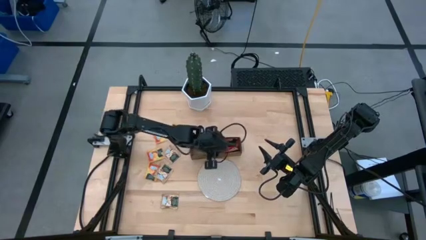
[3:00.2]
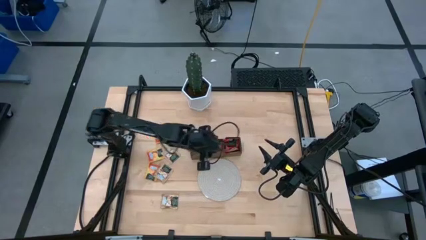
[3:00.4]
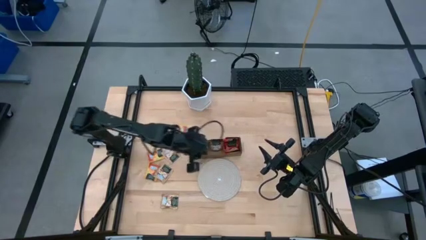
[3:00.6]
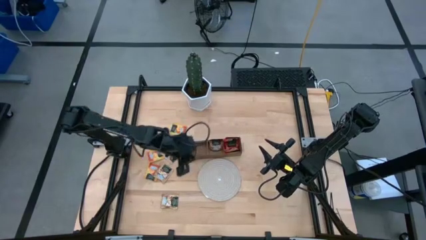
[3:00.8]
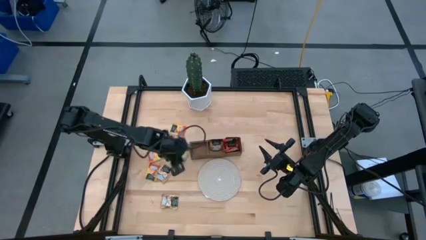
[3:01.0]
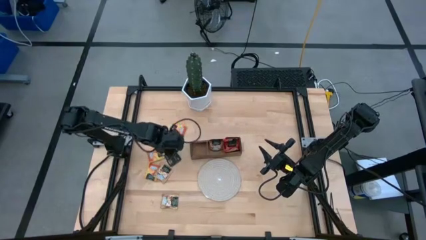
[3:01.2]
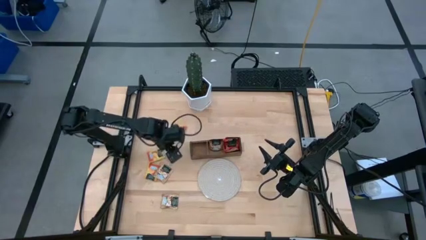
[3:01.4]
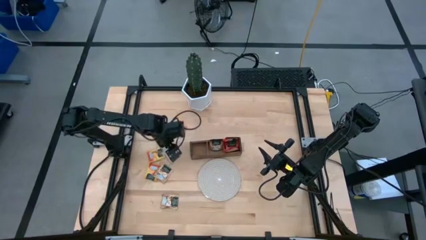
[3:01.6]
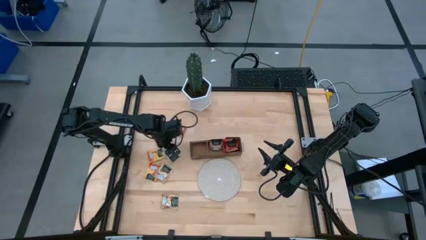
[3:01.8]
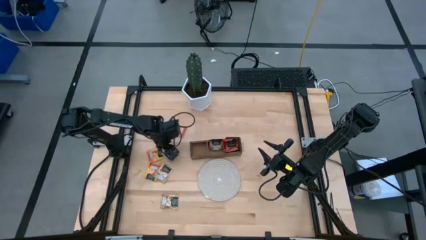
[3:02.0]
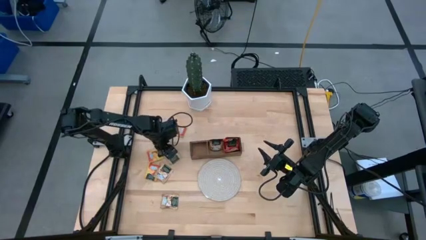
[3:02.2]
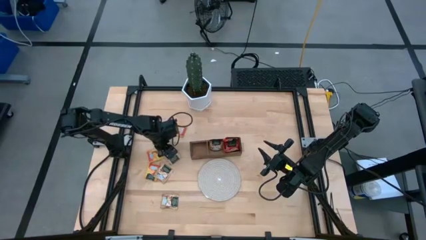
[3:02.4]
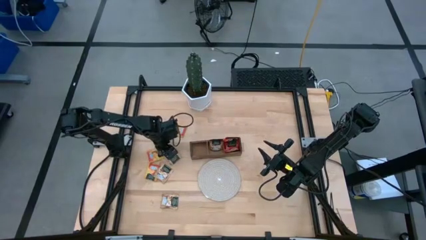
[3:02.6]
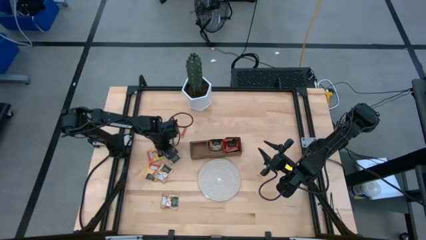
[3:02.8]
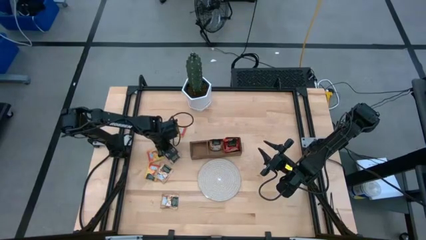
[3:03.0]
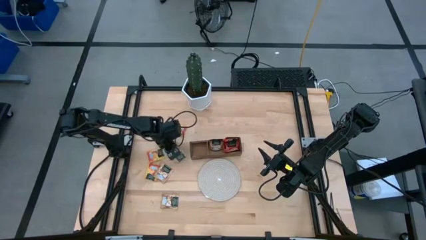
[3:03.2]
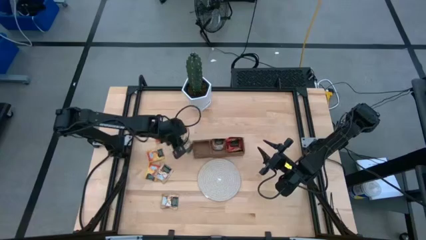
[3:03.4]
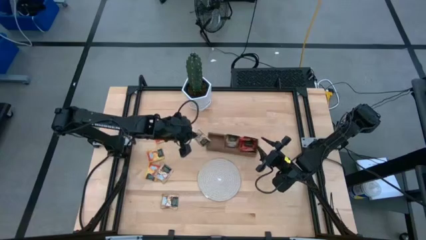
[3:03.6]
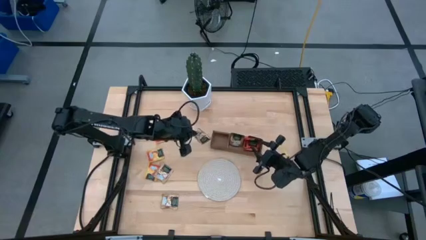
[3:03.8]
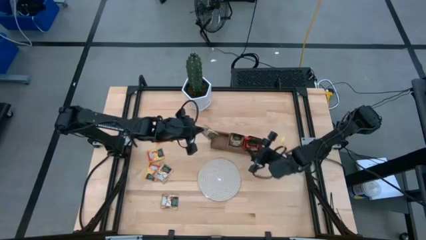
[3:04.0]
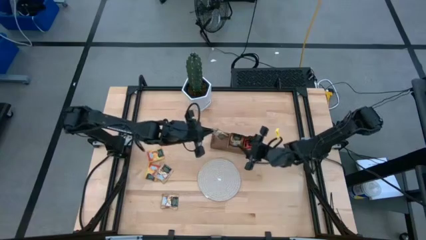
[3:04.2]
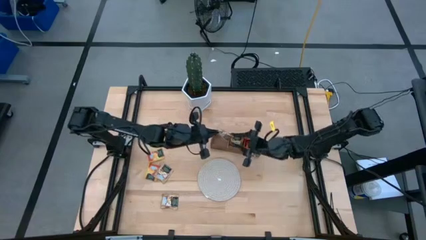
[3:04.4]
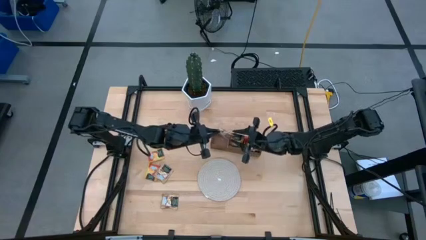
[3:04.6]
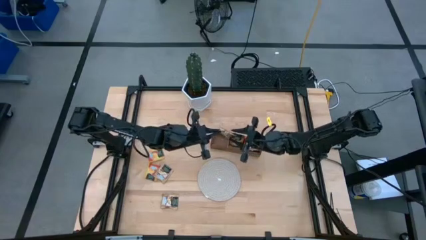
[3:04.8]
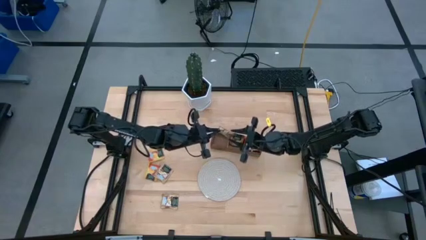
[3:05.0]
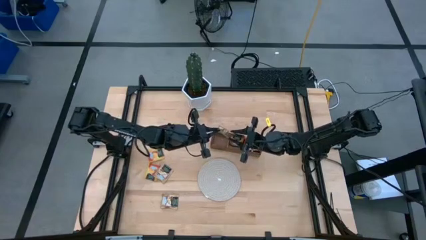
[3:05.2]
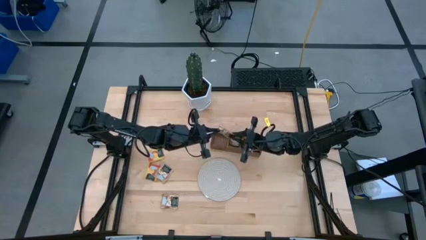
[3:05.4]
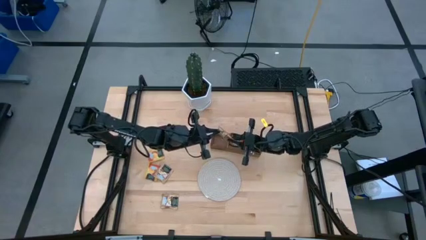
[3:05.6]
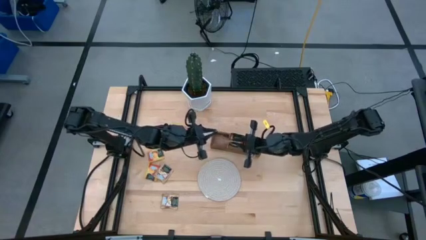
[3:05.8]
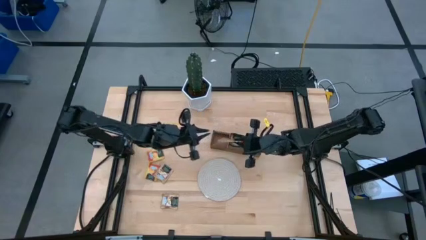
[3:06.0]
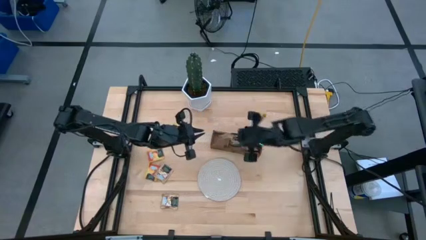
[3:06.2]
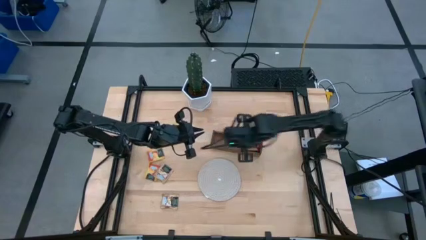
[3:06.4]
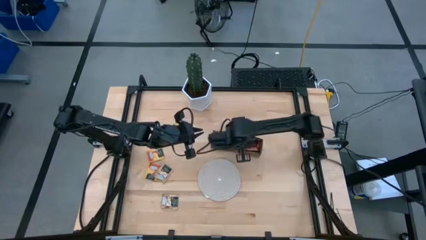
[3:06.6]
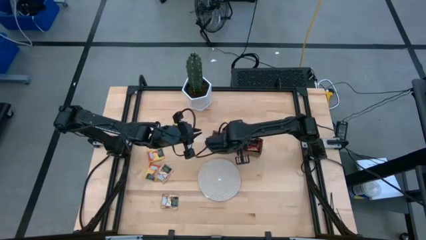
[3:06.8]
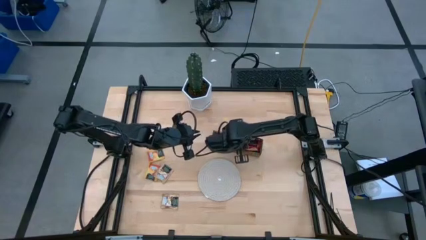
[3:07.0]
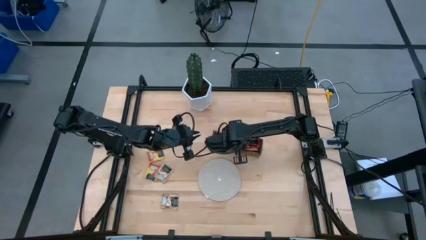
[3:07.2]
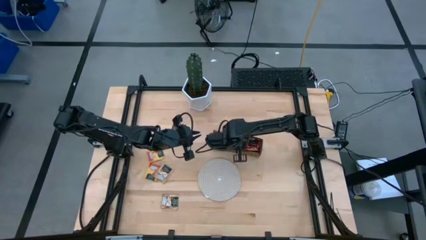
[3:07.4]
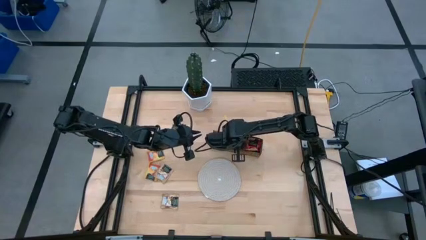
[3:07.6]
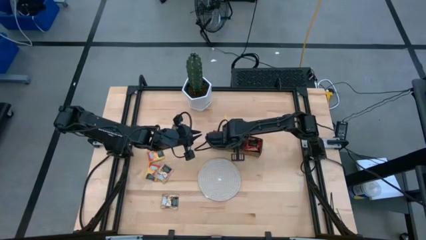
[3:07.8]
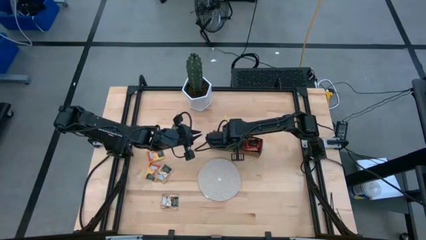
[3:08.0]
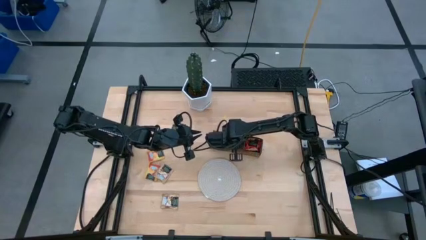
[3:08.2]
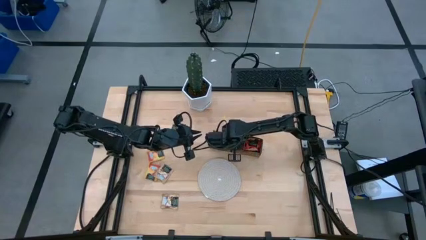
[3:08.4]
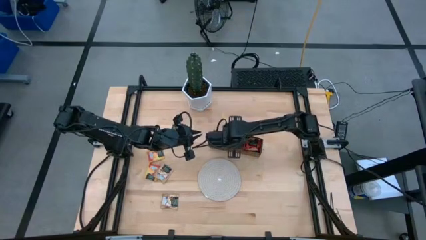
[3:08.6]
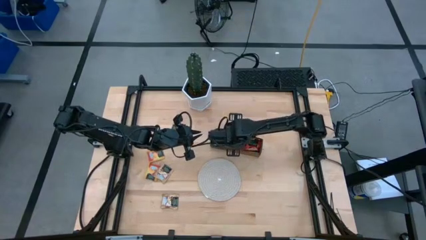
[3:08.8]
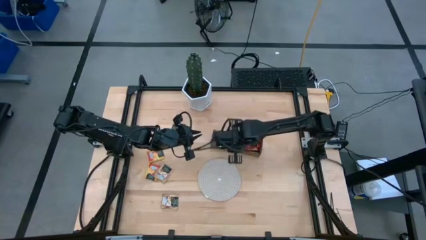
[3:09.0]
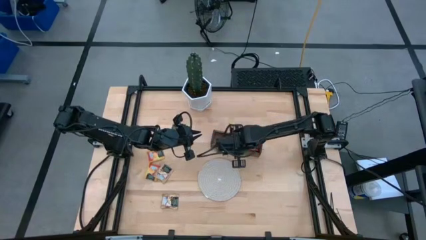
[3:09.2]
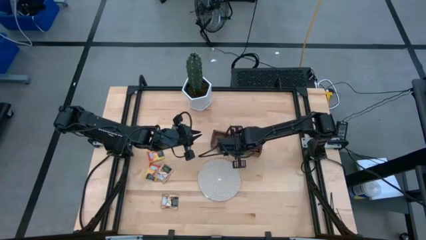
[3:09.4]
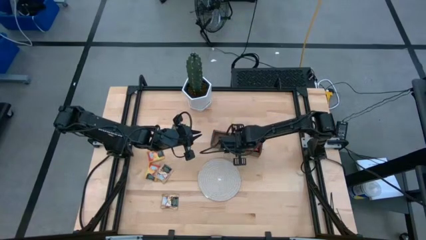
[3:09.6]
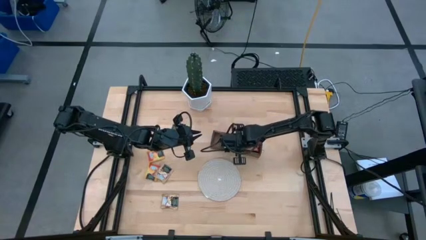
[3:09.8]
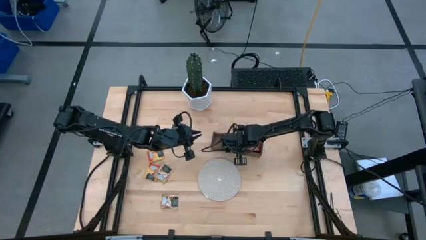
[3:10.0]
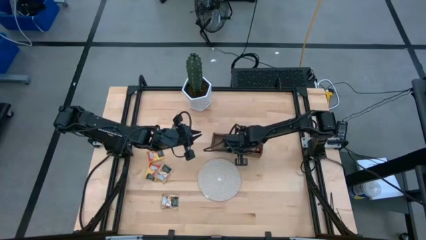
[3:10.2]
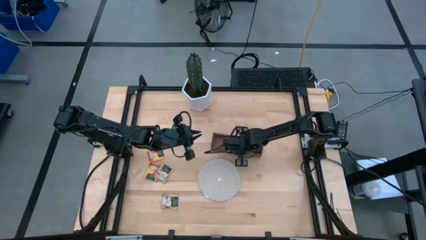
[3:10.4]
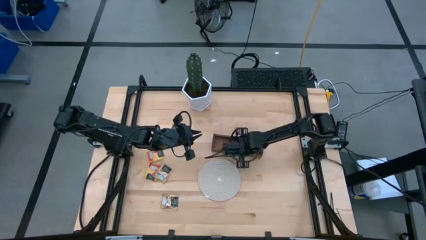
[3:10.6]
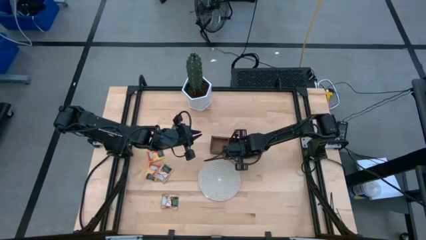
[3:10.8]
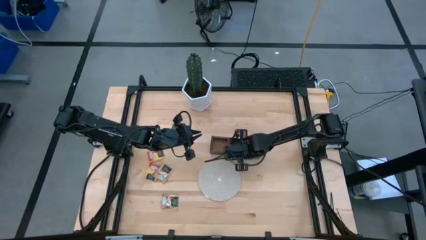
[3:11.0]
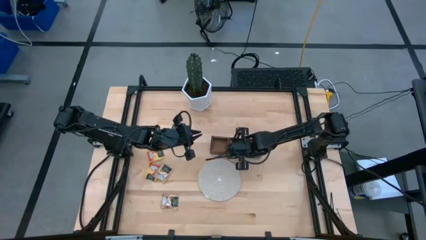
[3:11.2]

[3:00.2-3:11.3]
Task: Pick & Place Tea
Put the brown tea bag into the middle section of the wooden organizer

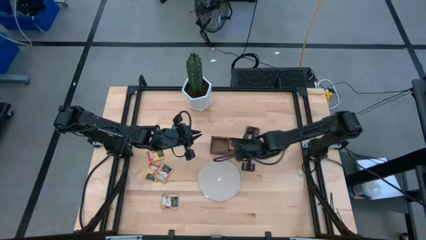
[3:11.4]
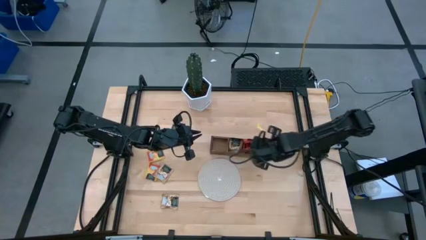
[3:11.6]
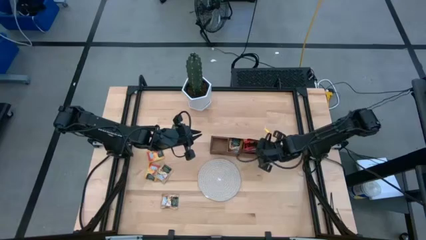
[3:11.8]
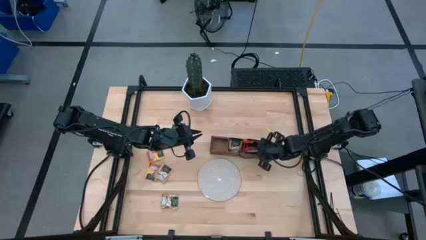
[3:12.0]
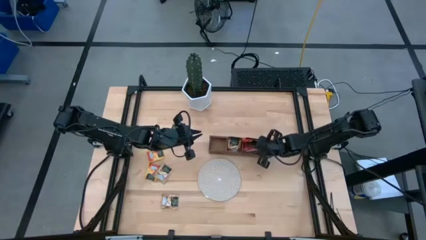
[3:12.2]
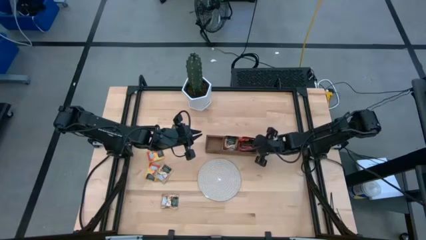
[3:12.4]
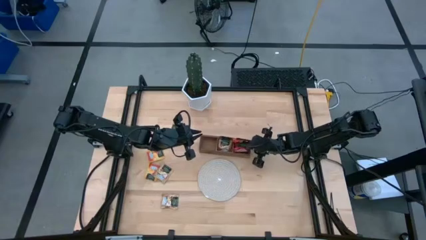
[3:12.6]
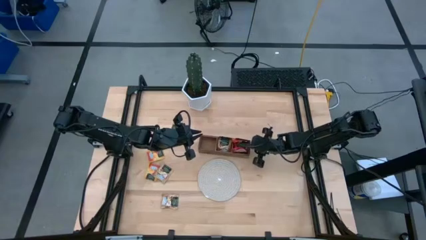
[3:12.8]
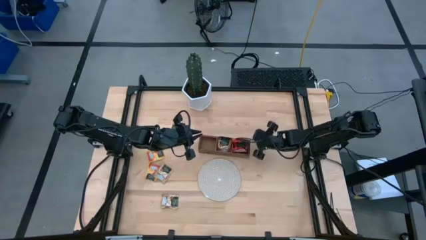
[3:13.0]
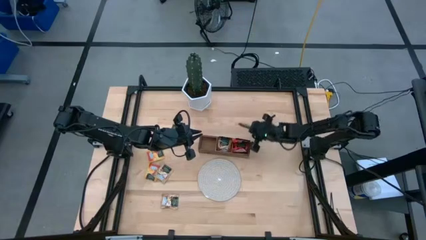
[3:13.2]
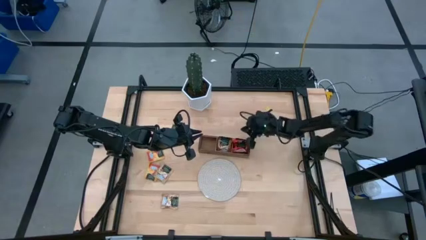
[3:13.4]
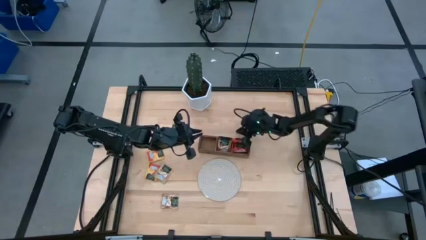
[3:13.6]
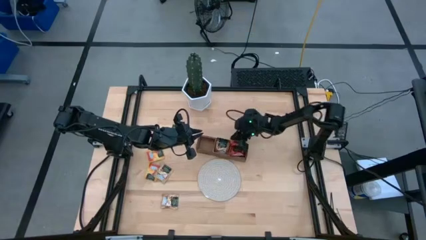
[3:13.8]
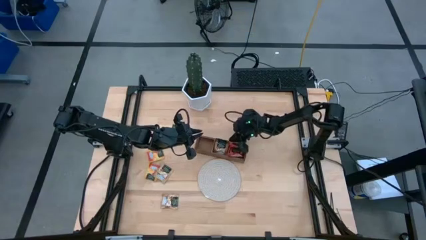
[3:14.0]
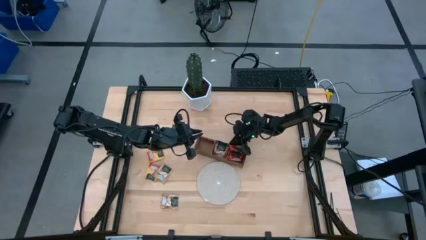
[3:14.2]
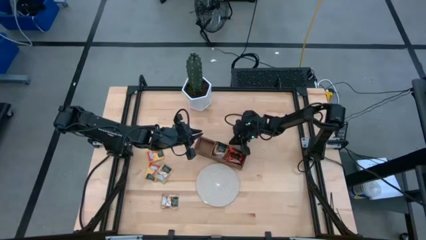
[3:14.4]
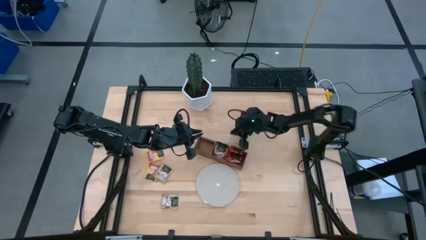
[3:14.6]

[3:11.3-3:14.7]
Adjust the wooden organizer

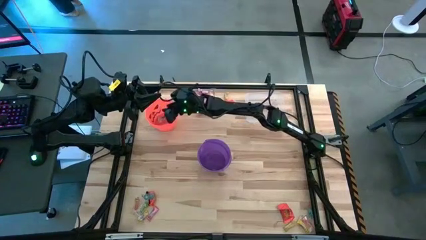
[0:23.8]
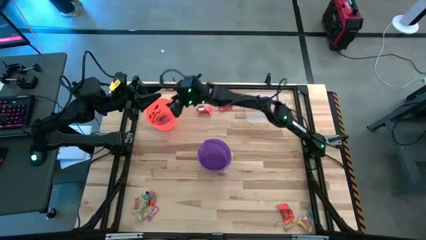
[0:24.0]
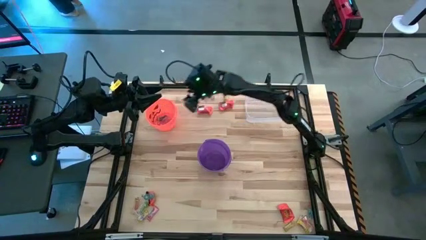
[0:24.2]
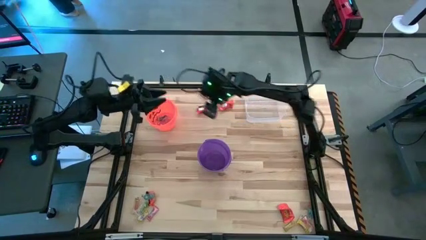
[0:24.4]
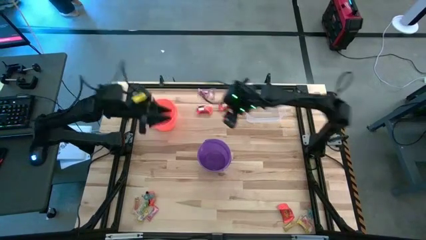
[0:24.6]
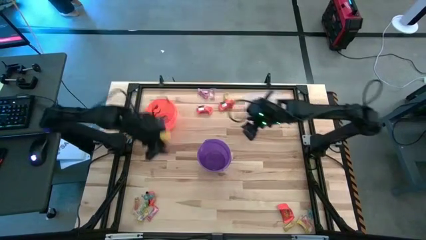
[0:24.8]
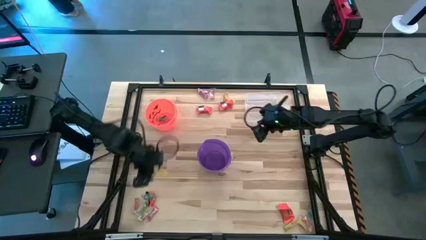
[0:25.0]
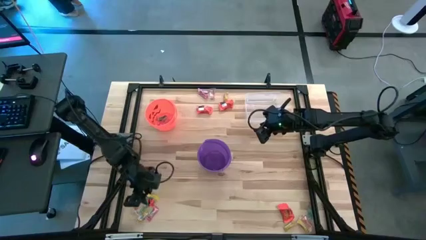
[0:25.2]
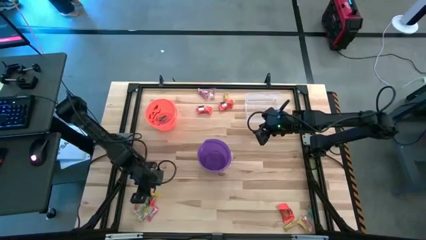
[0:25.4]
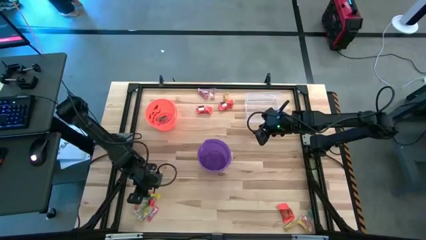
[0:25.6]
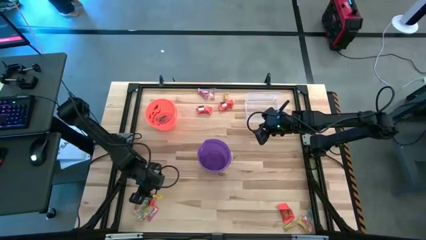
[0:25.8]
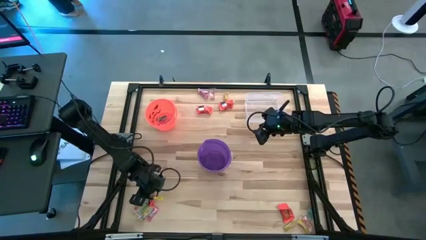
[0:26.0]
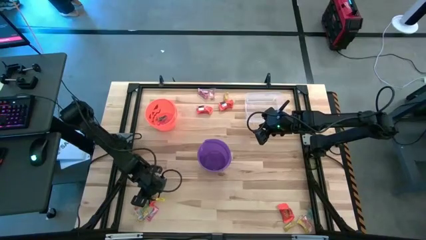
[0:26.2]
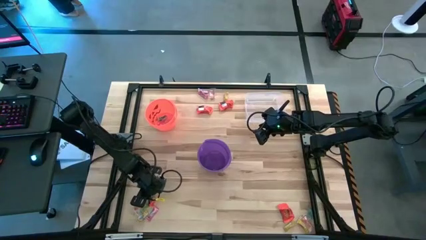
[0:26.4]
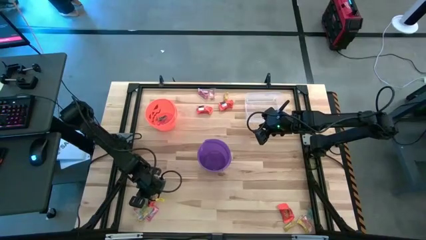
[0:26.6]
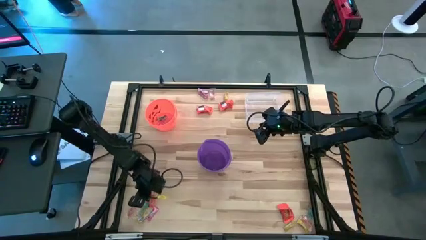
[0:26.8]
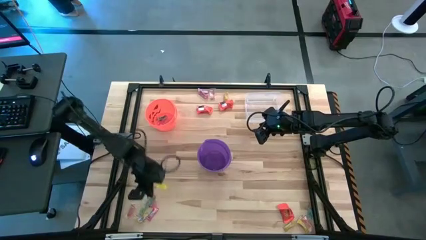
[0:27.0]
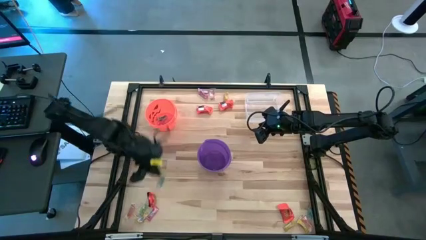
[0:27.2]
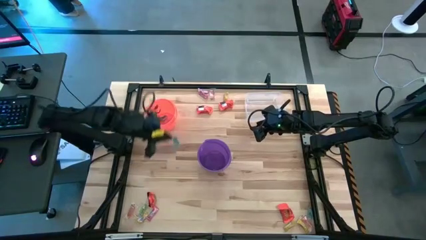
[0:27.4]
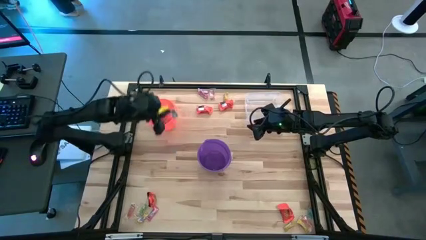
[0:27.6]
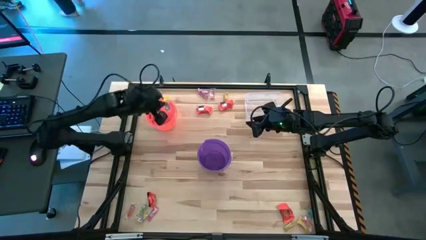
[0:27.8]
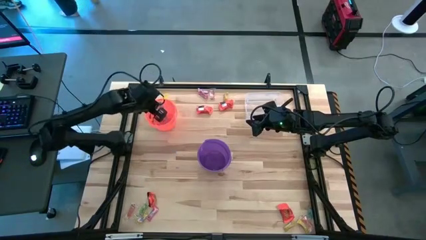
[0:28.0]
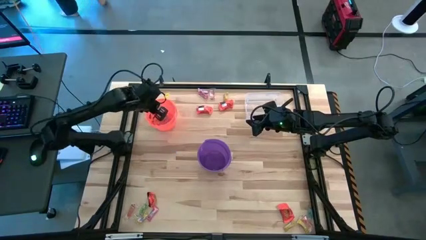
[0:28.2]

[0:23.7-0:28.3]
Task: Sort candy by brand, put in halloween buckets
Put the blue gummy into the orange bucket
